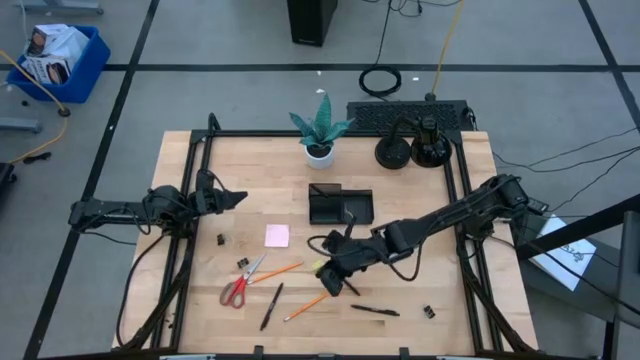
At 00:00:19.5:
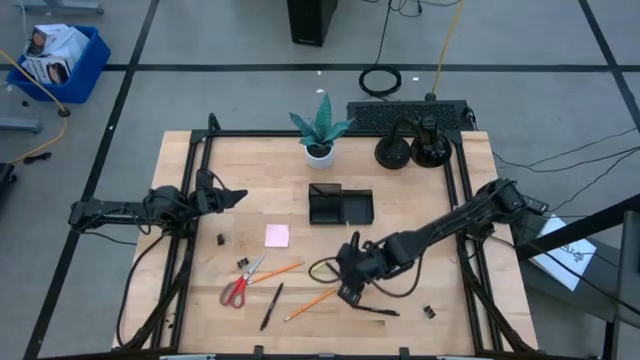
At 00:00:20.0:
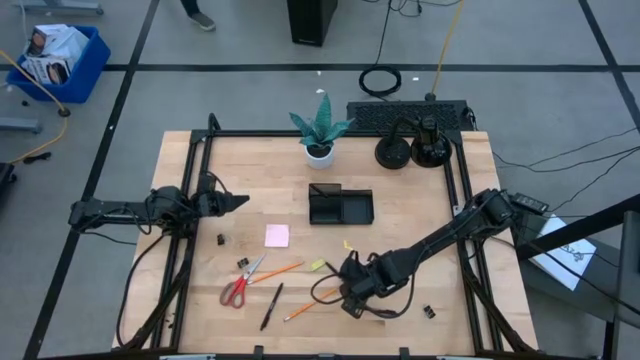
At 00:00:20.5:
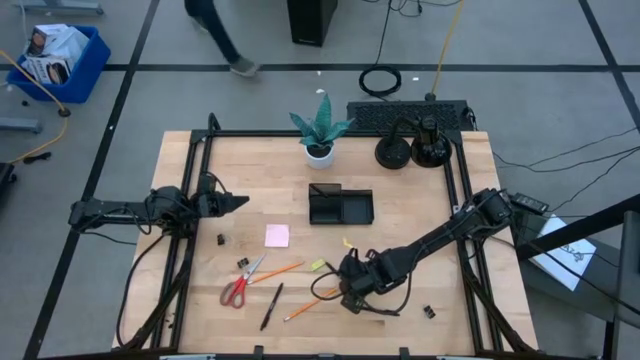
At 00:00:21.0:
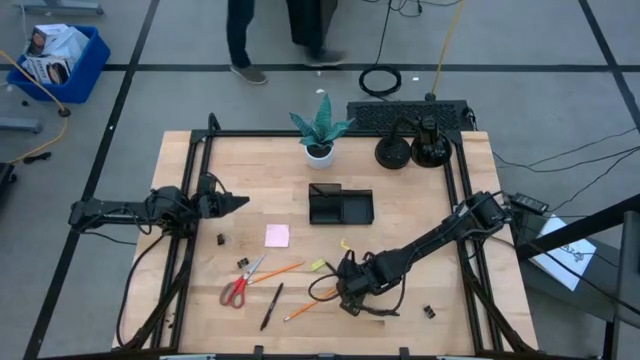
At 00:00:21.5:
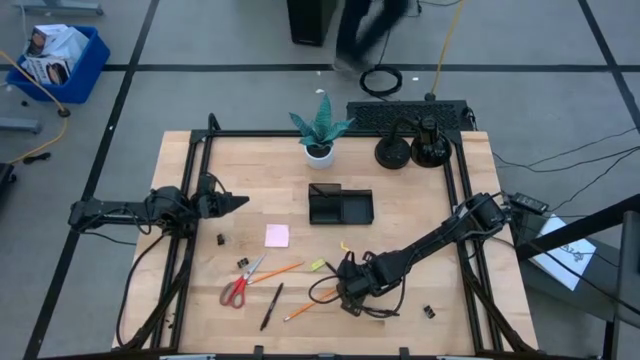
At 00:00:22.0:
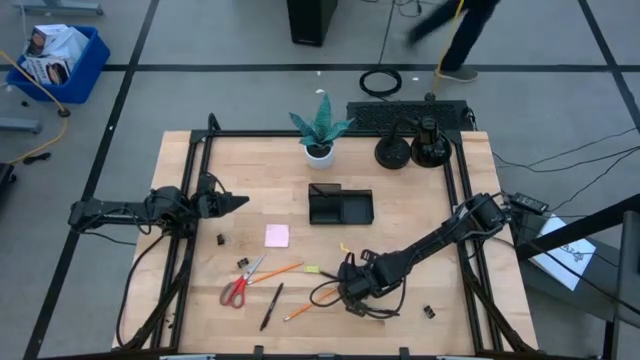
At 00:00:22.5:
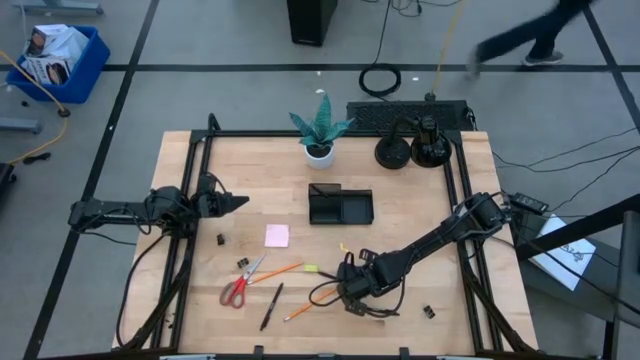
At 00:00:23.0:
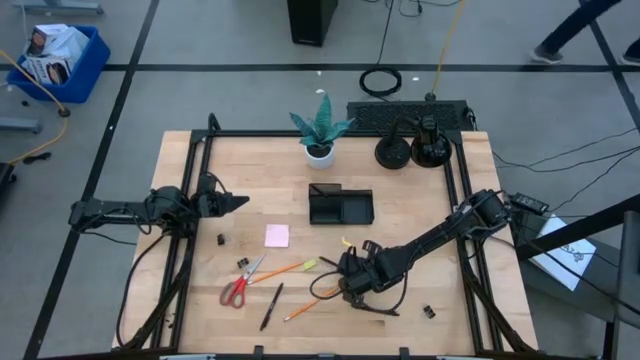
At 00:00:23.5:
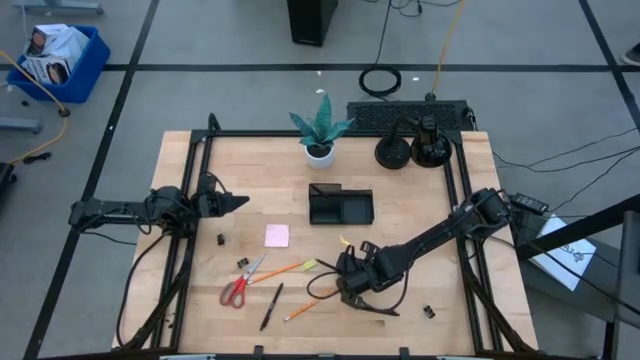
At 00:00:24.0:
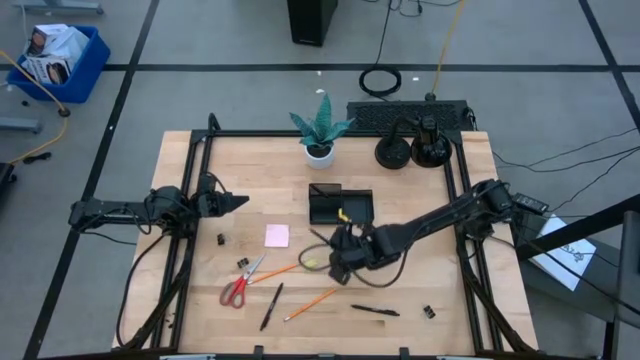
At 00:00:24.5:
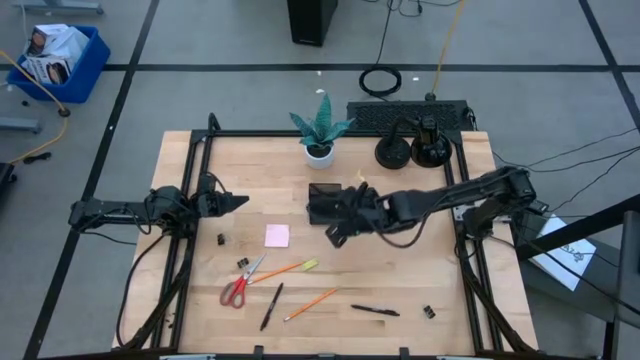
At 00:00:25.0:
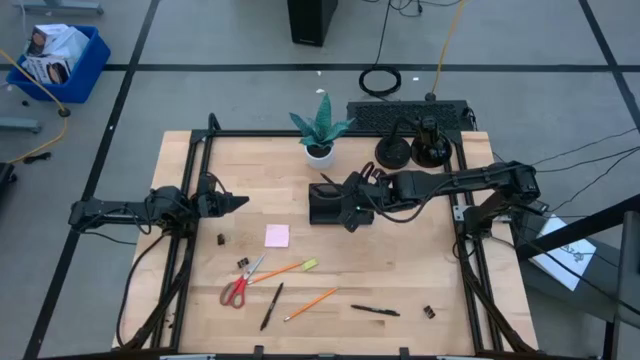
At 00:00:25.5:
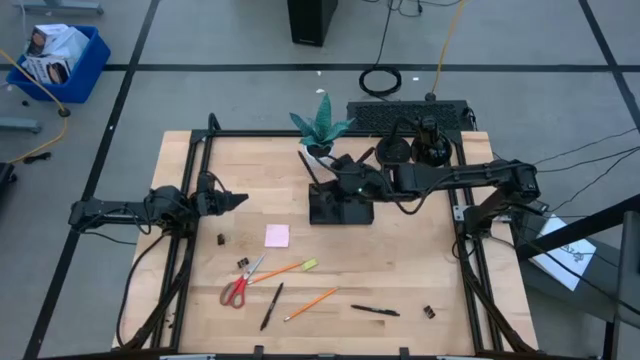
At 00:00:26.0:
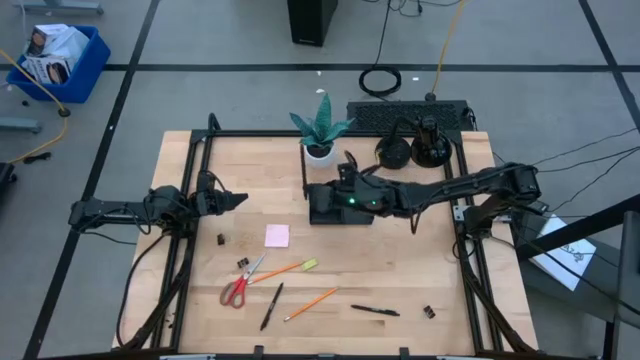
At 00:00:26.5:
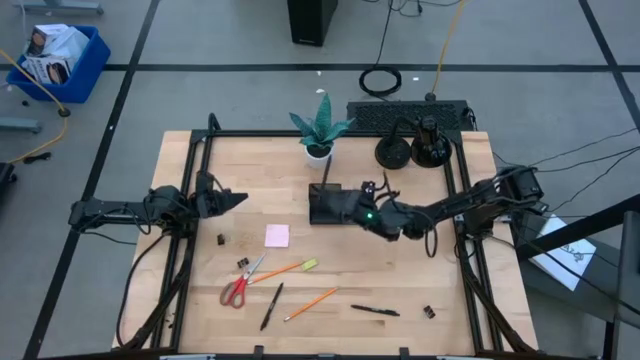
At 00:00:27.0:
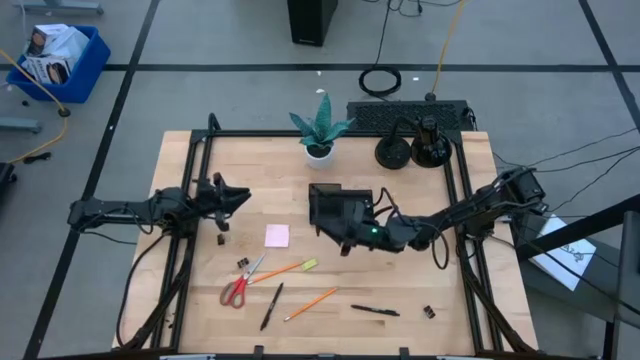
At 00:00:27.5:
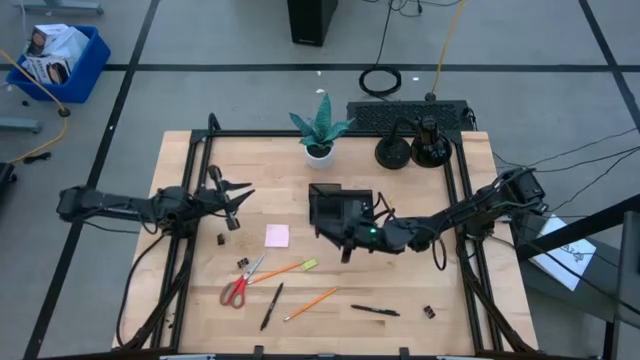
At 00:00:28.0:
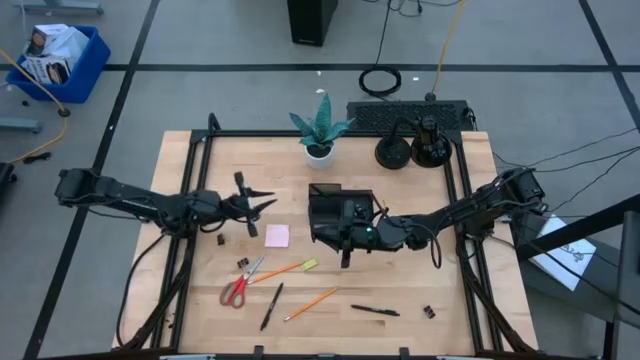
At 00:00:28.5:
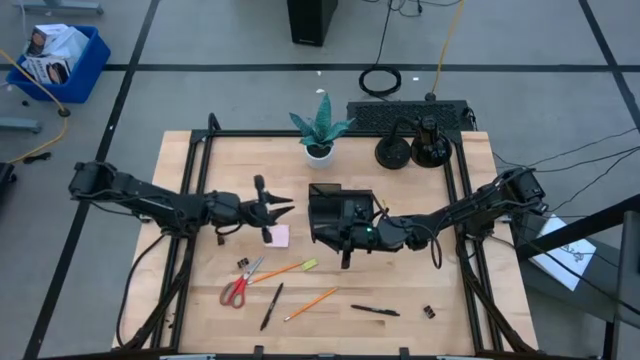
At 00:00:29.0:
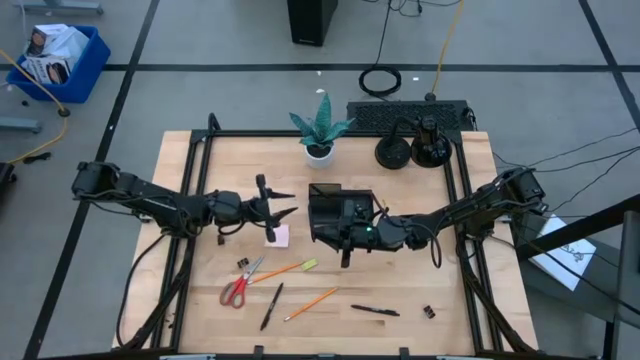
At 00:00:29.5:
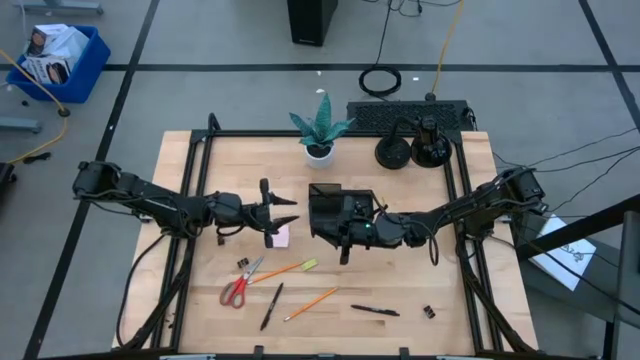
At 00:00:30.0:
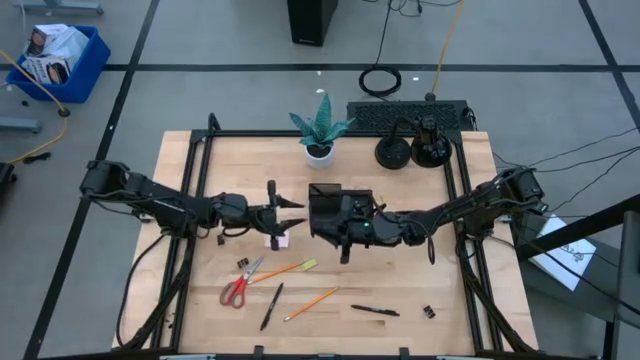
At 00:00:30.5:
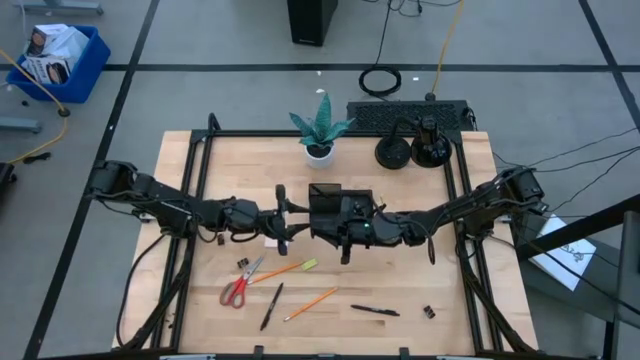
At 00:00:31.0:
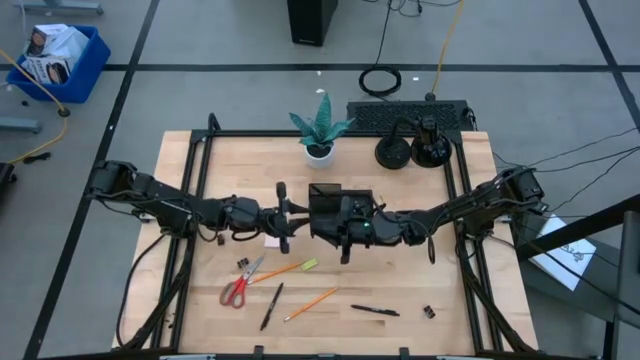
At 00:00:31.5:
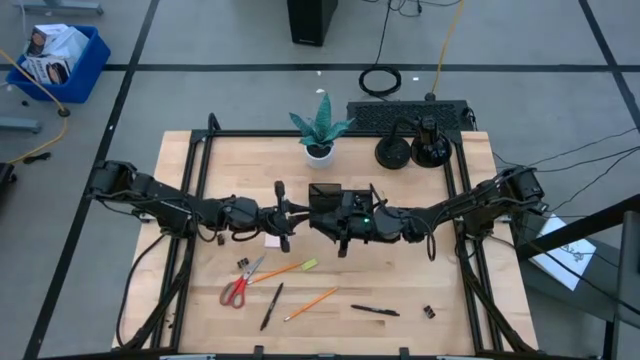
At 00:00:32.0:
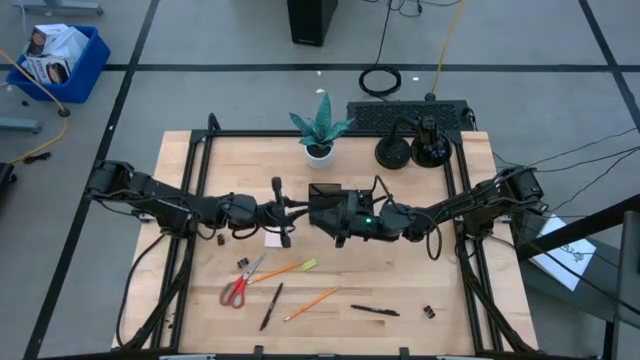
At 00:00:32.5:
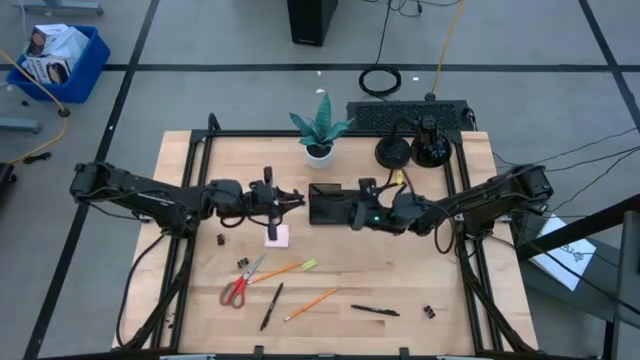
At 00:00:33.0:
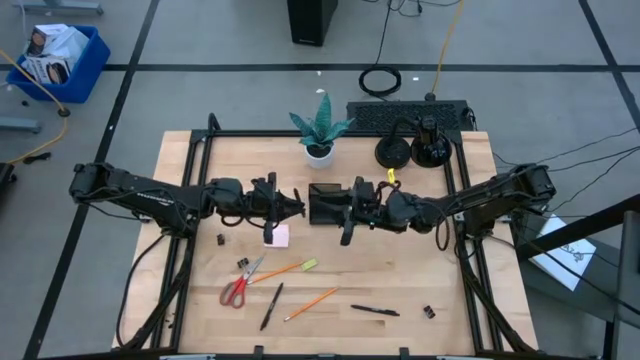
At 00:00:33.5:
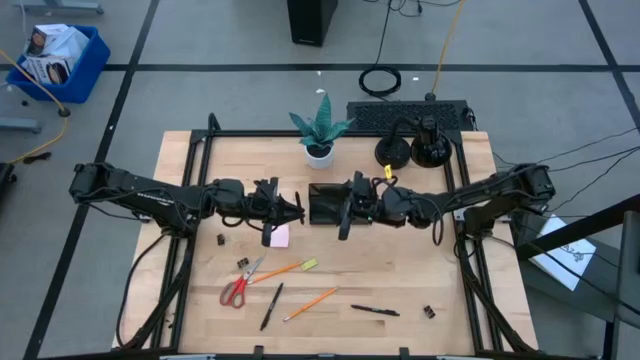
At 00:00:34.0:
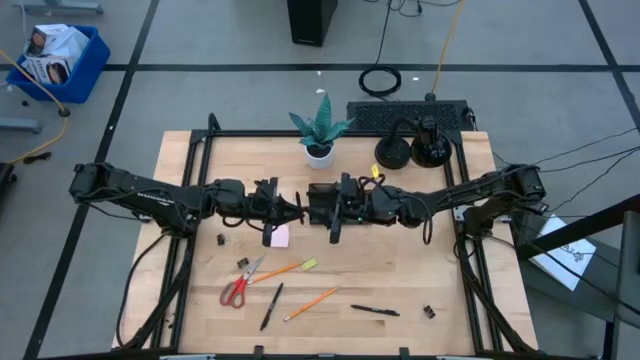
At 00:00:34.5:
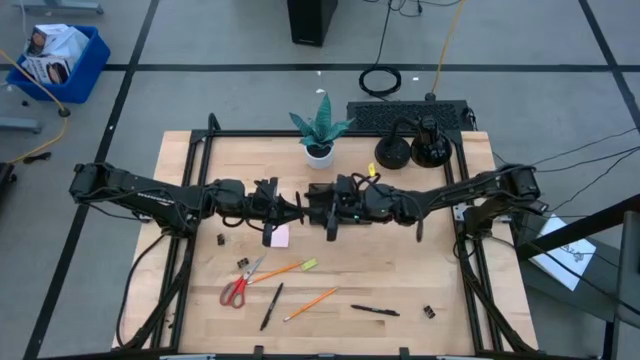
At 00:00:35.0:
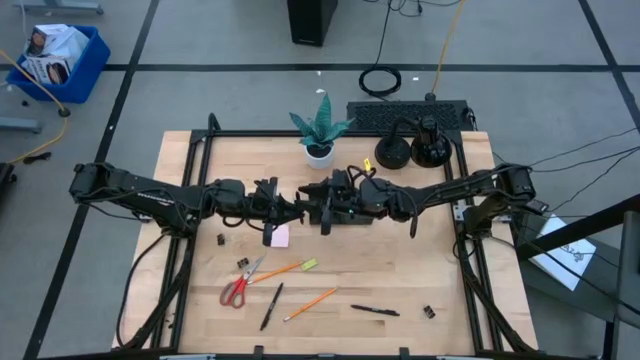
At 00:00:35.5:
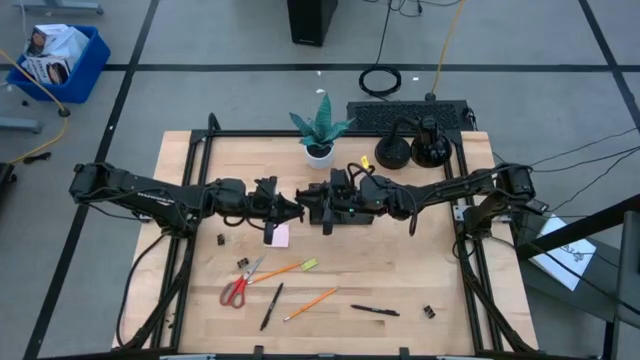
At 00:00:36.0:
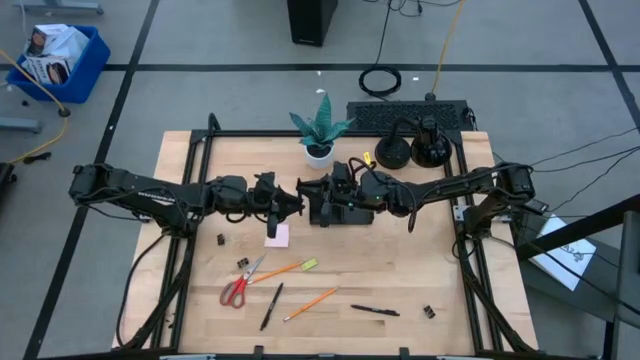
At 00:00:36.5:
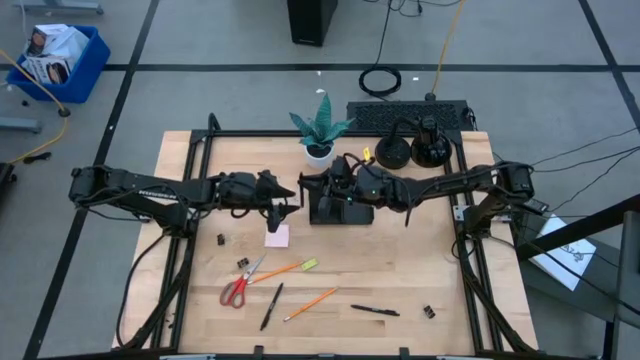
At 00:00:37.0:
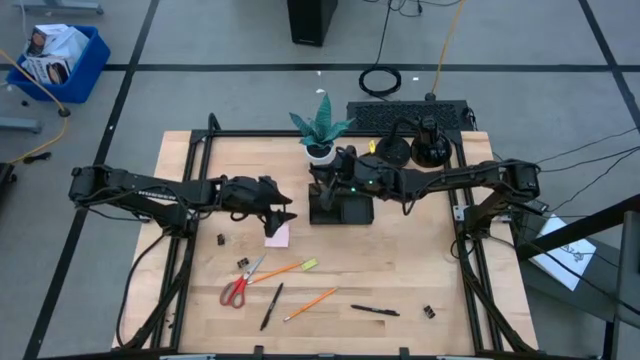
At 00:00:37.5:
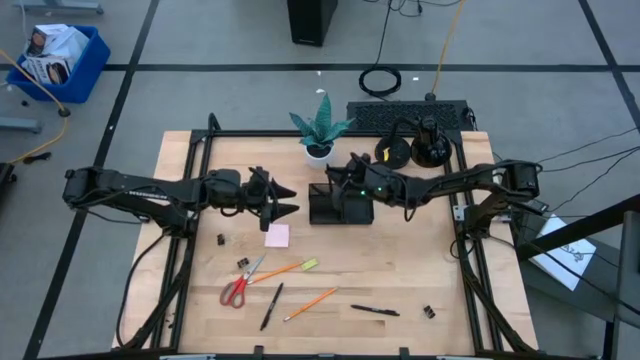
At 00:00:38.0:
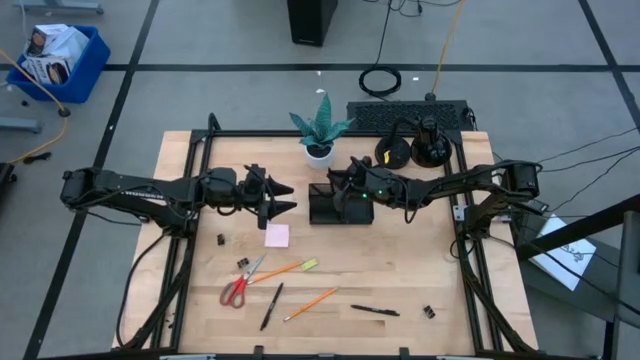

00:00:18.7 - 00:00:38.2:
Task: Pick and place office supplies into organizer
Put the black pen into the black desk organizer
